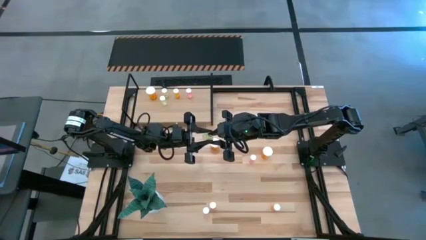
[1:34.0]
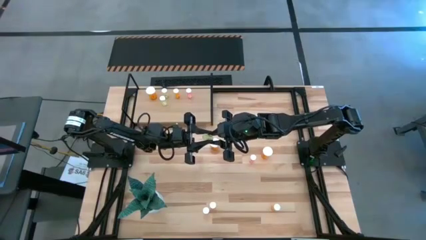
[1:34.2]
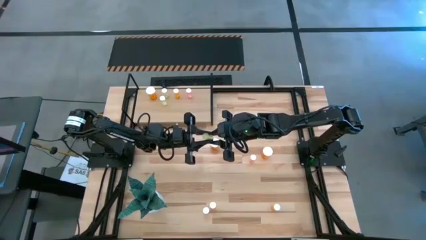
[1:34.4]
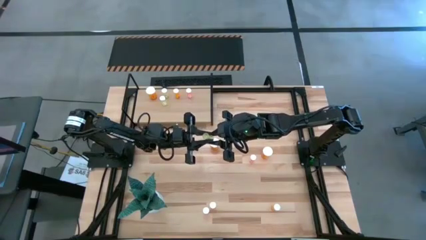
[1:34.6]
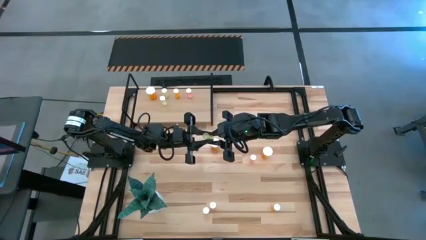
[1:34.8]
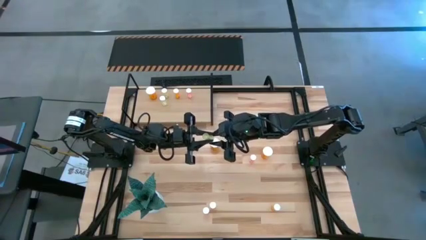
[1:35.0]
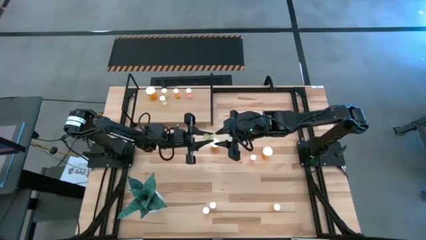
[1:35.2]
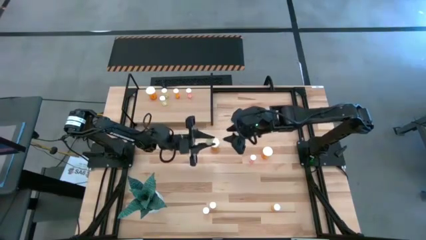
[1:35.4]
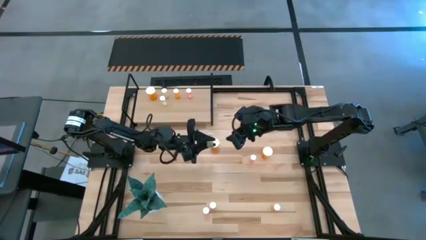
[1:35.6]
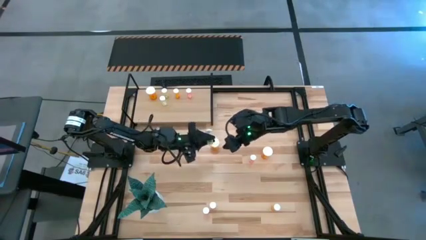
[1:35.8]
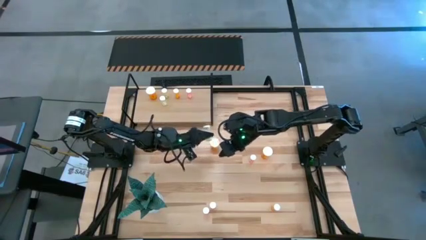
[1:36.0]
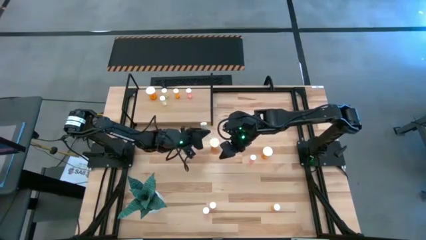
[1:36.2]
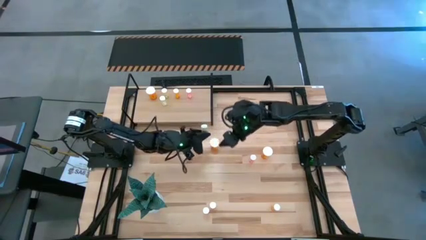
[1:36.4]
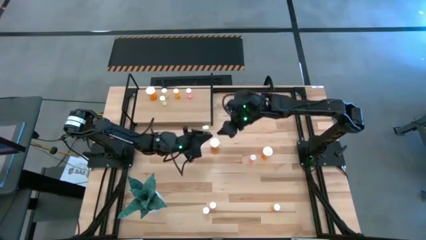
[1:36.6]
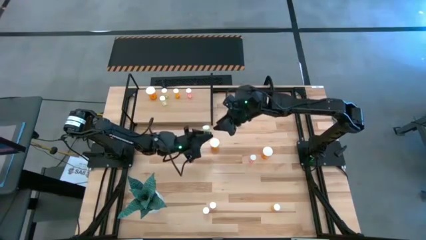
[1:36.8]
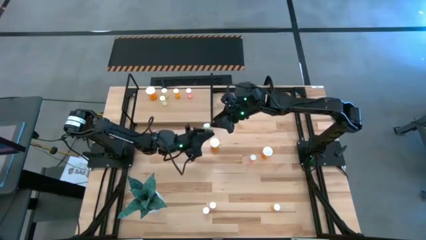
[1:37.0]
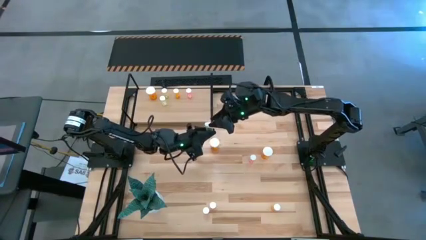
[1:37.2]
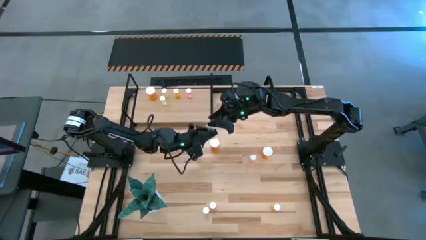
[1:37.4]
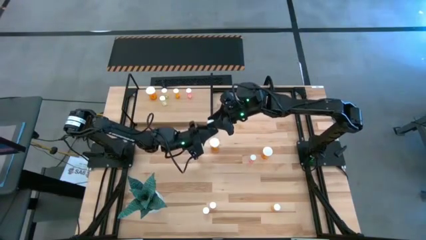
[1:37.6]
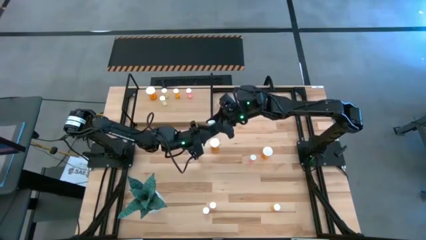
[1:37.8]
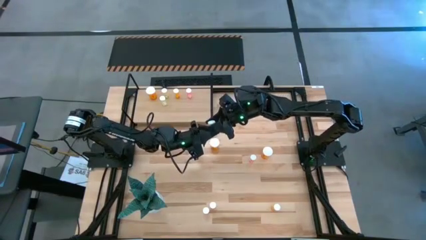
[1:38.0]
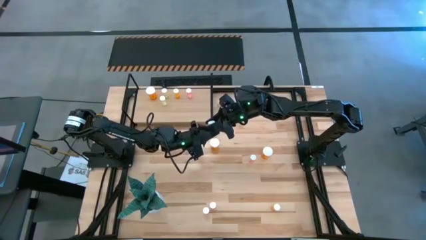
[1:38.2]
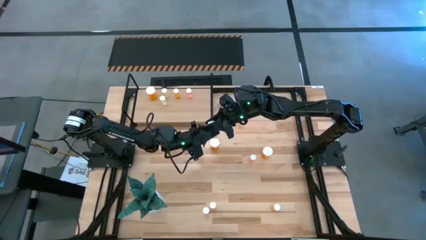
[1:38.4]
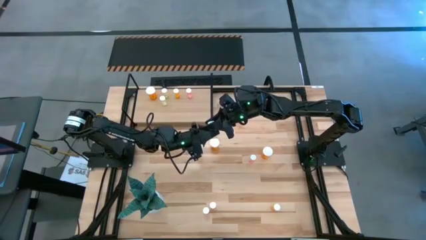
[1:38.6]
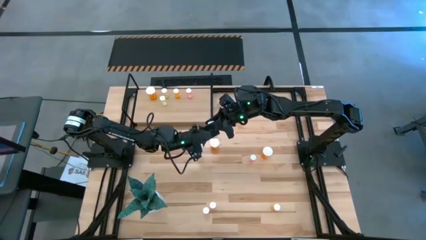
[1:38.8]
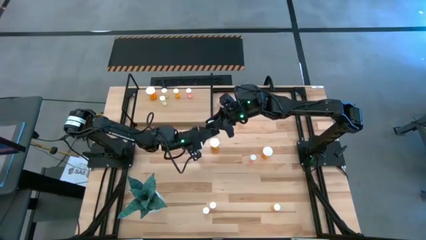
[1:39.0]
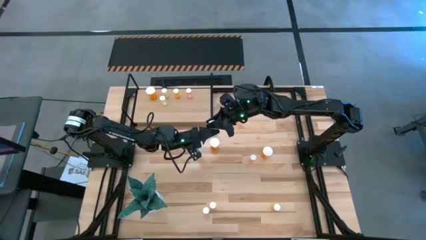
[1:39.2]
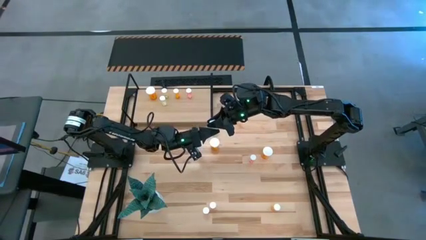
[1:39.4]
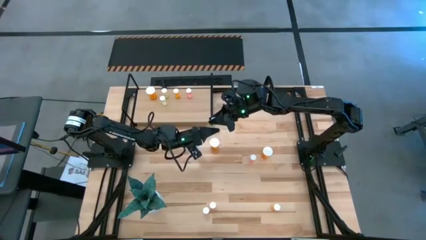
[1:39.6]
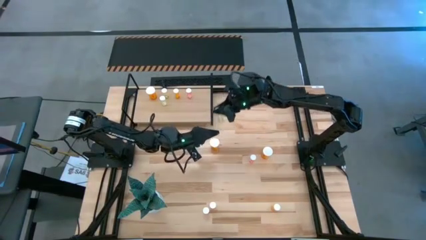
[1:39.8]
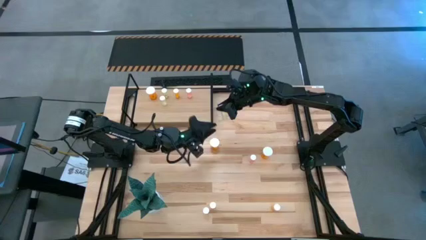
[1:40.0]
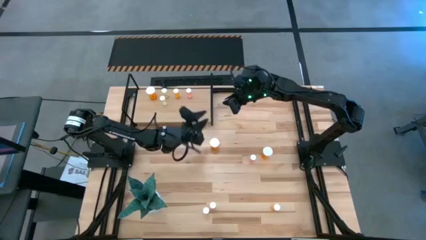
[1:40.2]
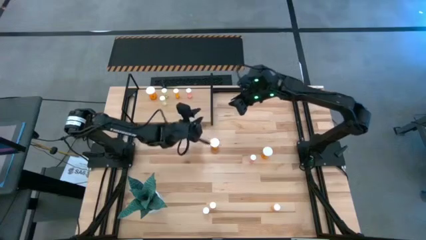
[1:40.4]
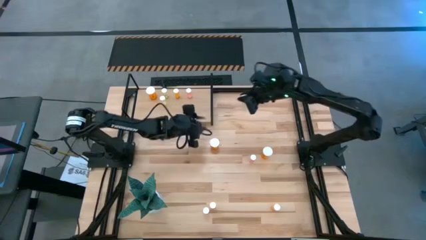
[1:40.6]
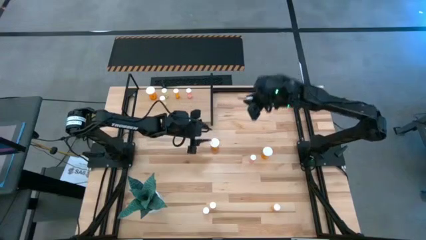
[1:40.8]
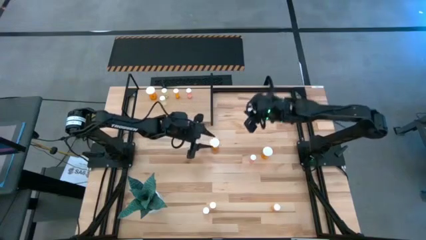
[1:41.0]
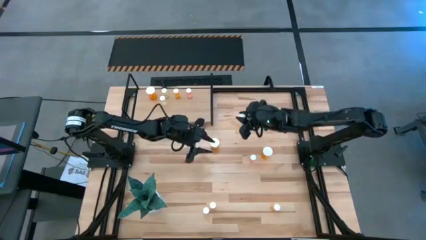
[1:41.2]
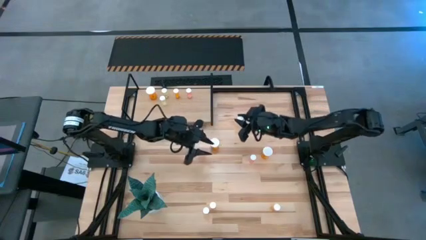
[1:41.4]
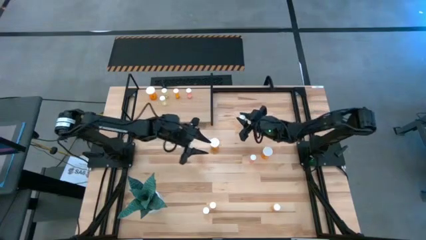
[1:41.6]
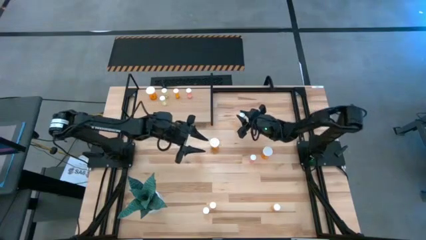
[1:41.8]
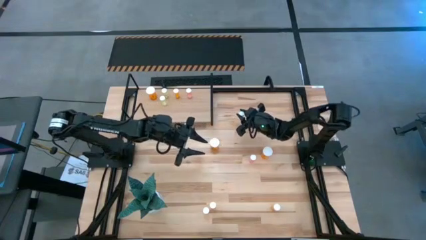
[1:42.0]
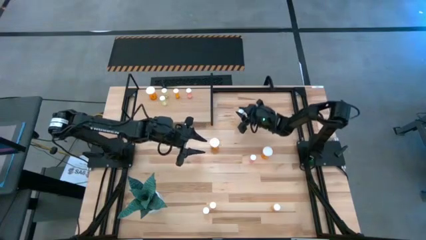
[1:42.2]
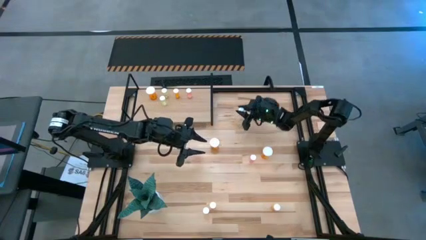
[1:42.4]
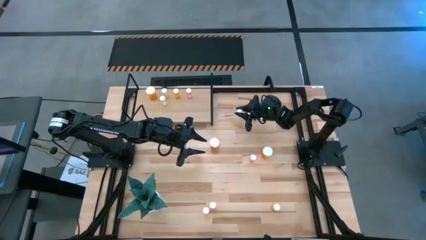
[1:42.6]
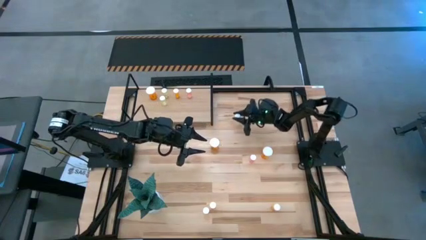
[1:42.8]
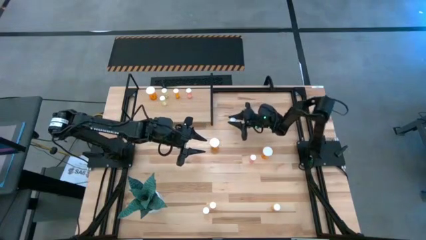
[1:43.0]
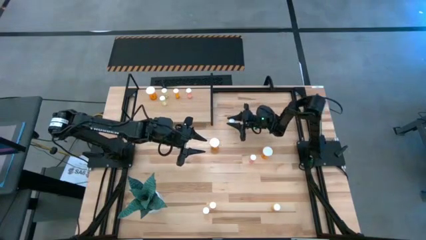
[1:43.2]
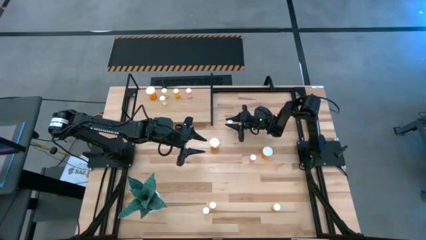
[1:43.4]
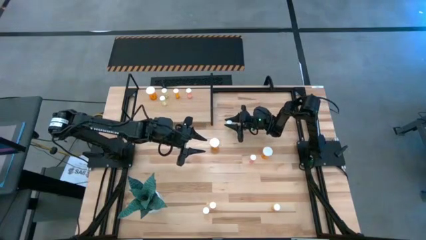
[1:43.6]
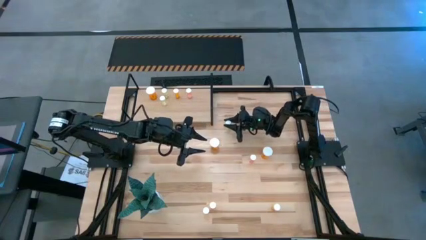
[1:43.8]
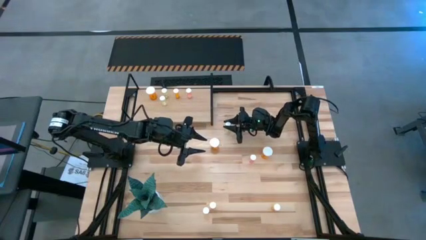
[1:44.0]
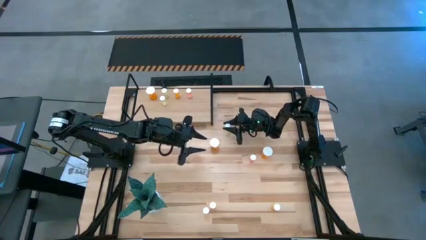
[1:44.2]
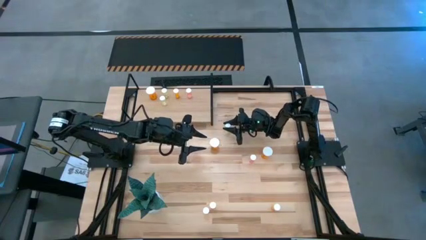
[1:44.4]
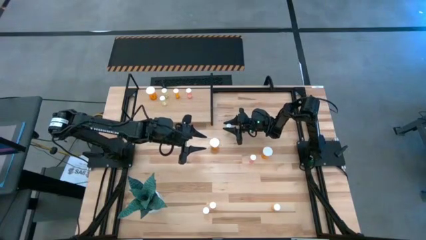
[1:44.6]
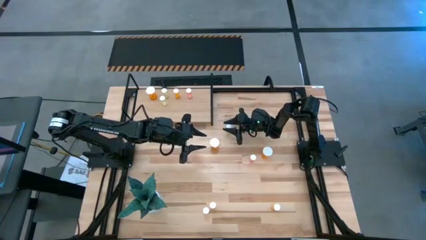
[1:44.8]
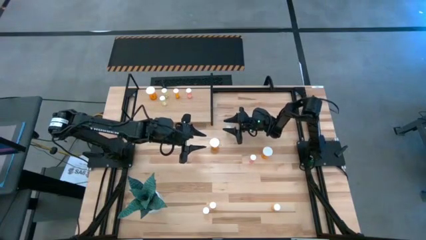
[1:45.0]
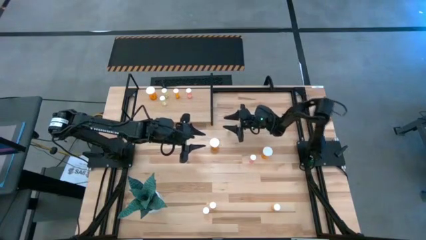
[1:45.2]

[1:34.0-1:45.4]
Task: Pick and place medicine bottles onto shelf by color
Move the yellow pill bottle to the middle of the table
